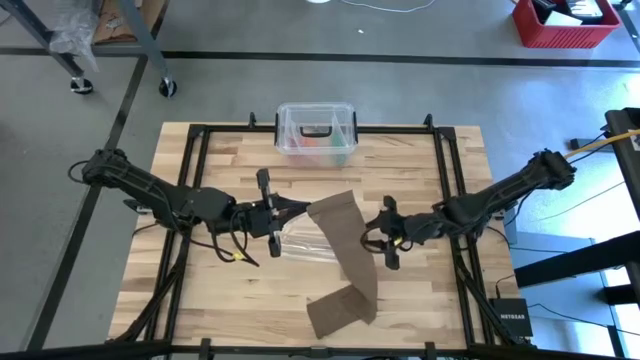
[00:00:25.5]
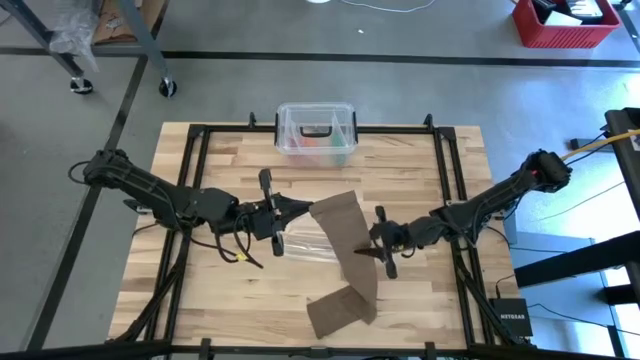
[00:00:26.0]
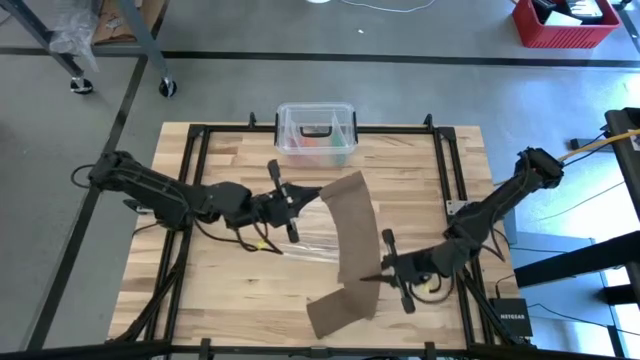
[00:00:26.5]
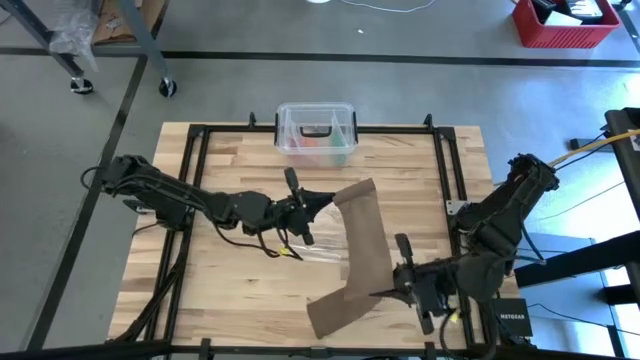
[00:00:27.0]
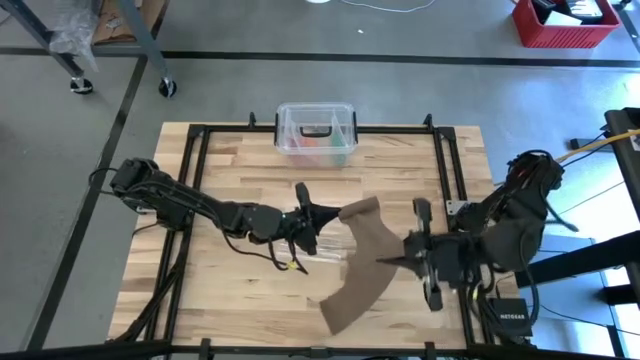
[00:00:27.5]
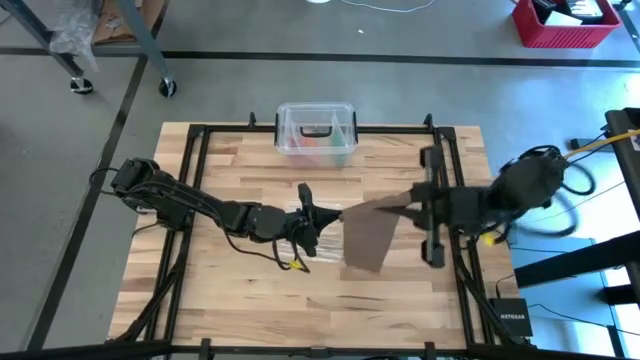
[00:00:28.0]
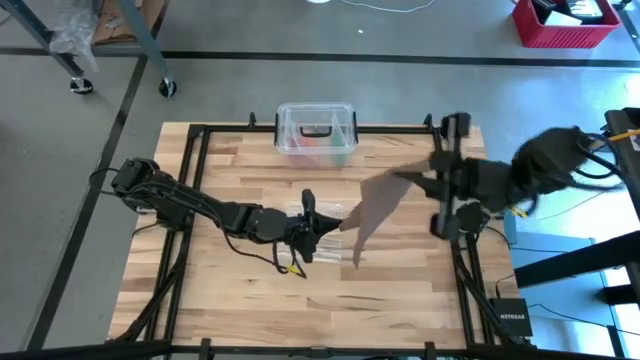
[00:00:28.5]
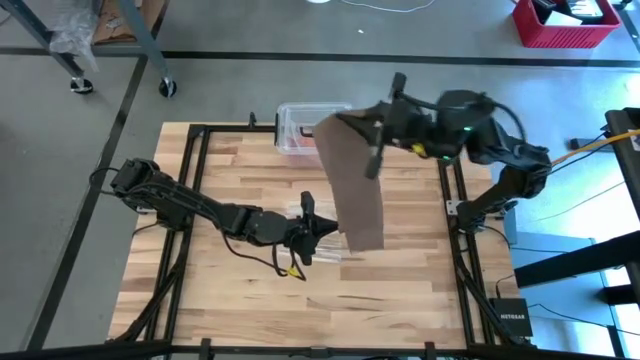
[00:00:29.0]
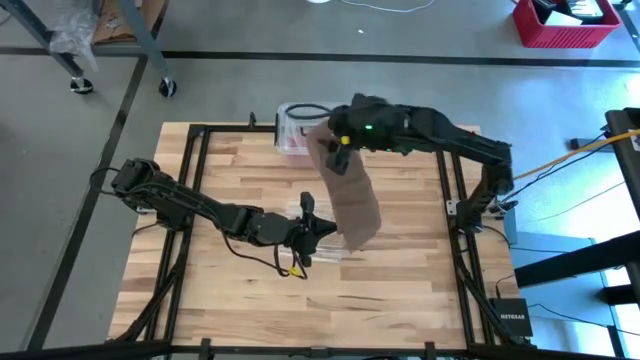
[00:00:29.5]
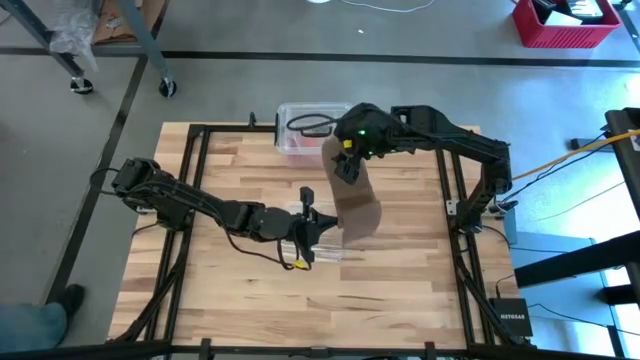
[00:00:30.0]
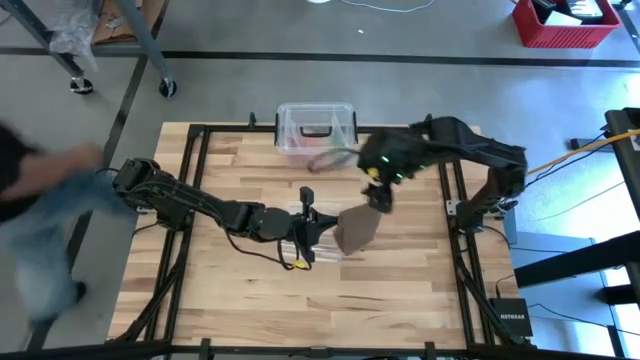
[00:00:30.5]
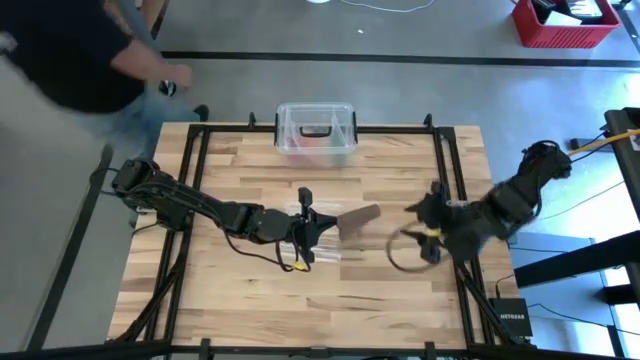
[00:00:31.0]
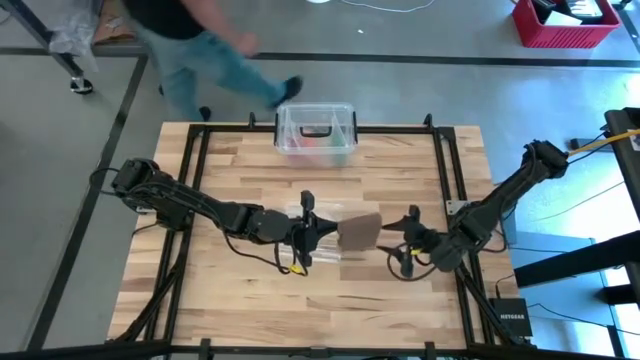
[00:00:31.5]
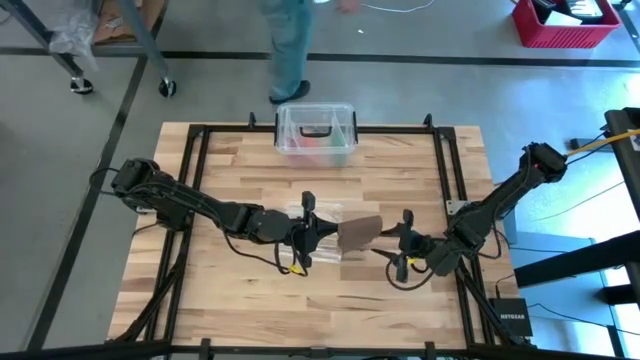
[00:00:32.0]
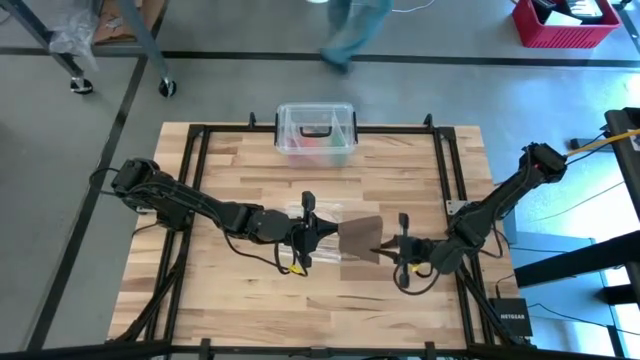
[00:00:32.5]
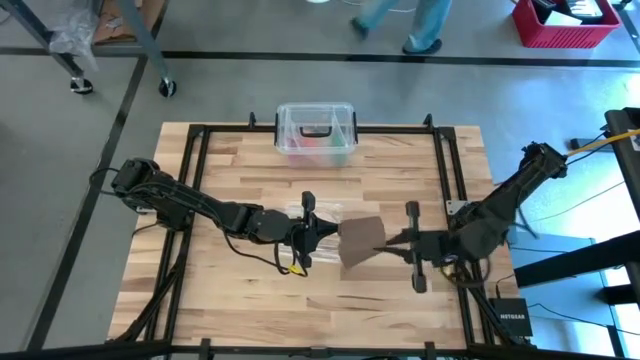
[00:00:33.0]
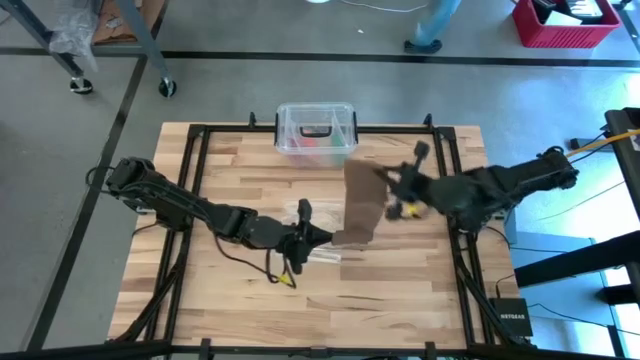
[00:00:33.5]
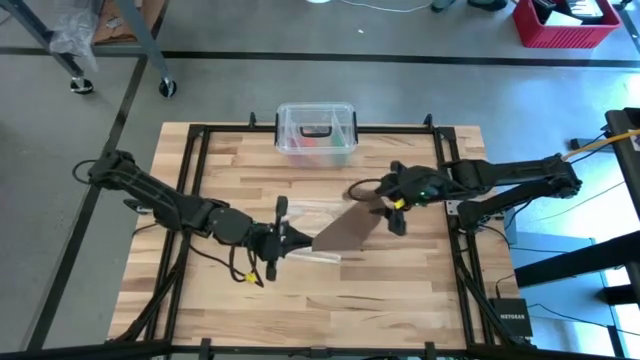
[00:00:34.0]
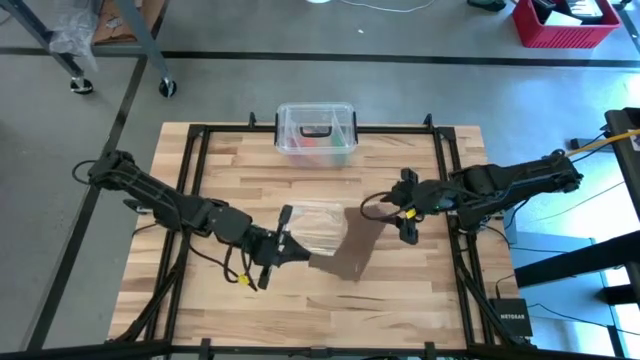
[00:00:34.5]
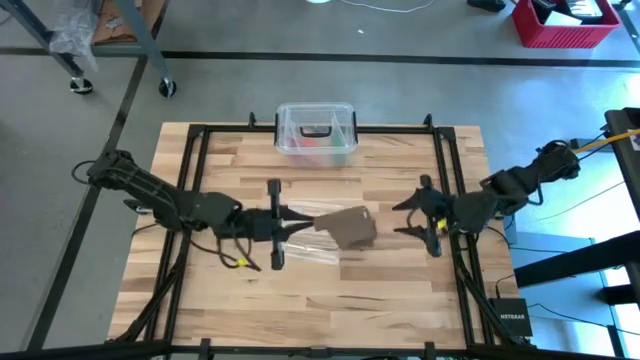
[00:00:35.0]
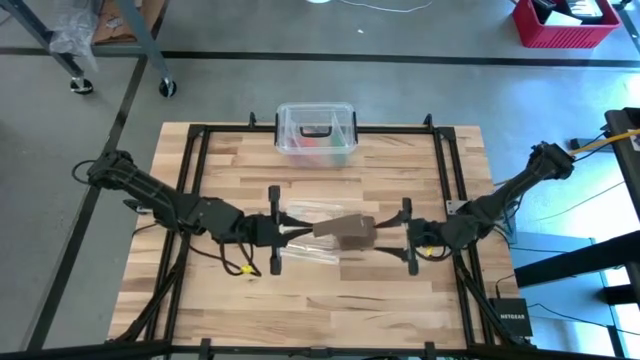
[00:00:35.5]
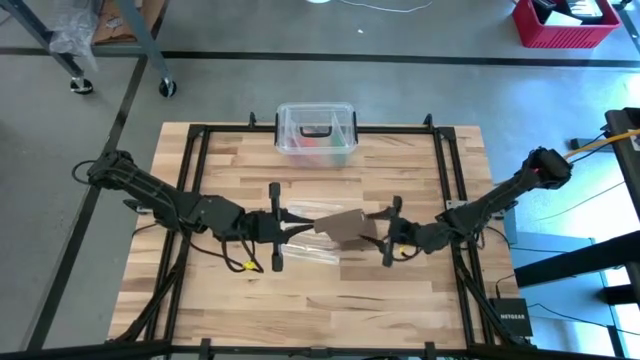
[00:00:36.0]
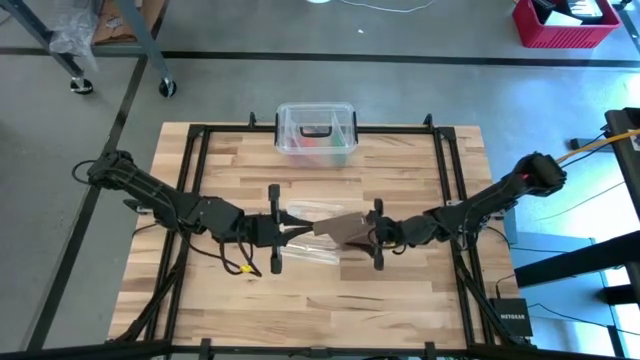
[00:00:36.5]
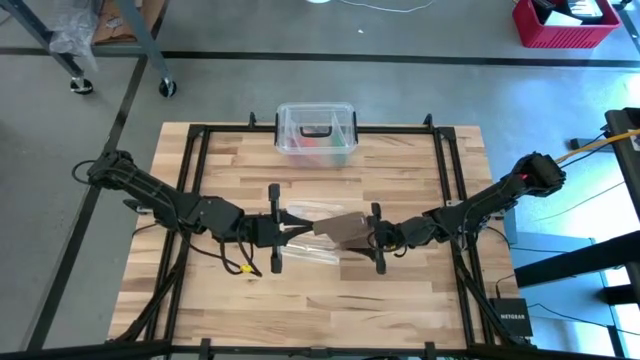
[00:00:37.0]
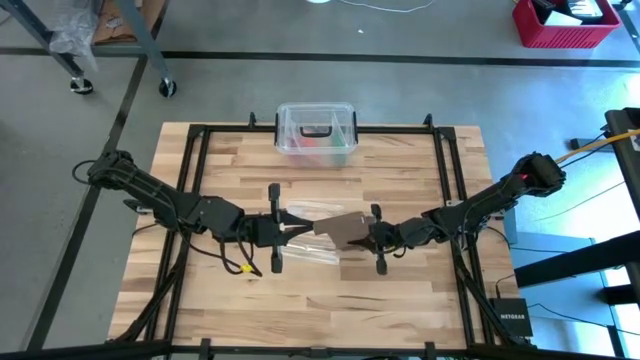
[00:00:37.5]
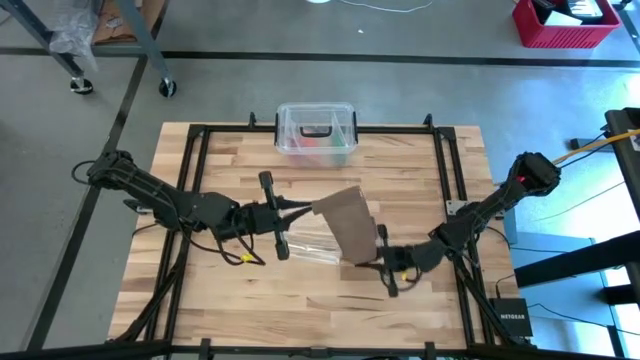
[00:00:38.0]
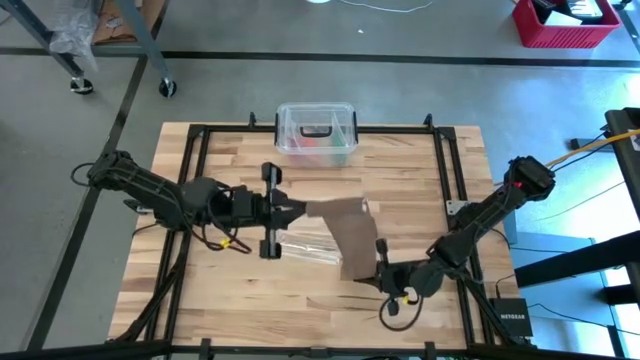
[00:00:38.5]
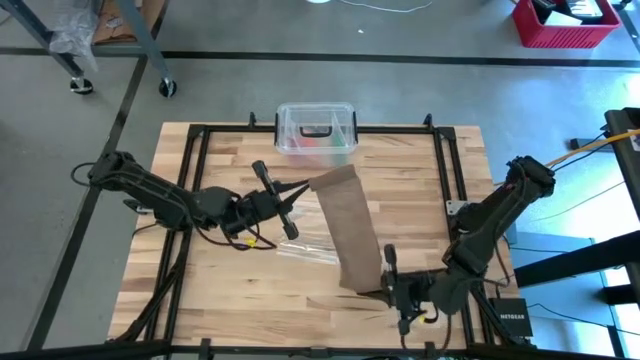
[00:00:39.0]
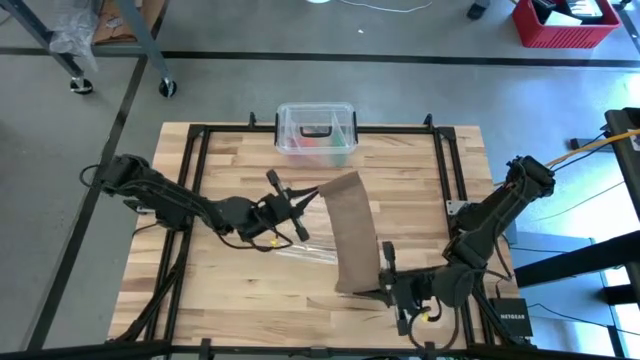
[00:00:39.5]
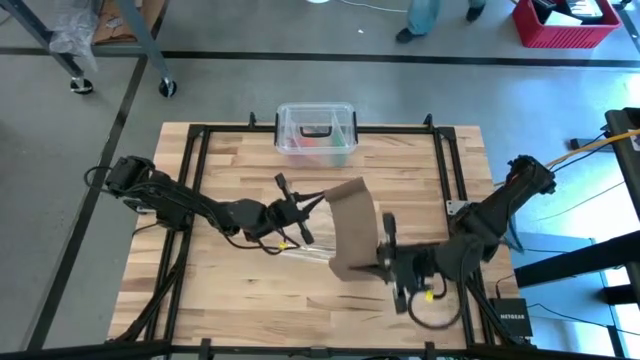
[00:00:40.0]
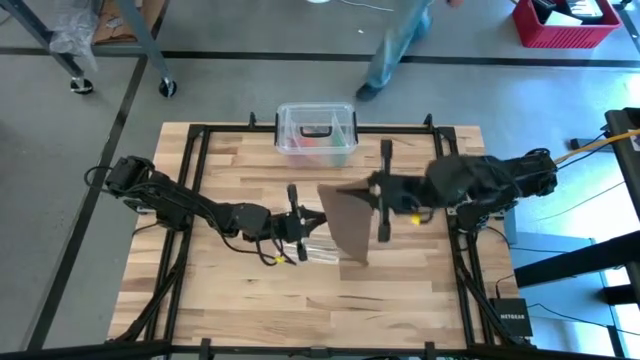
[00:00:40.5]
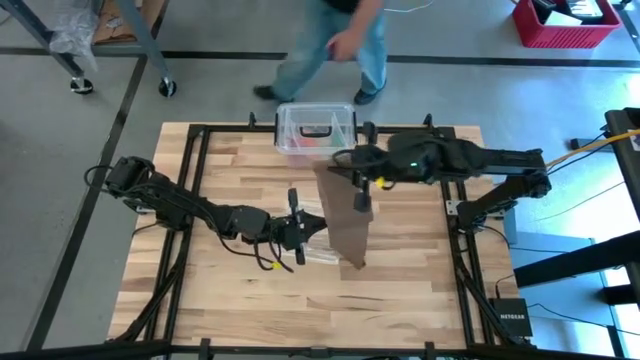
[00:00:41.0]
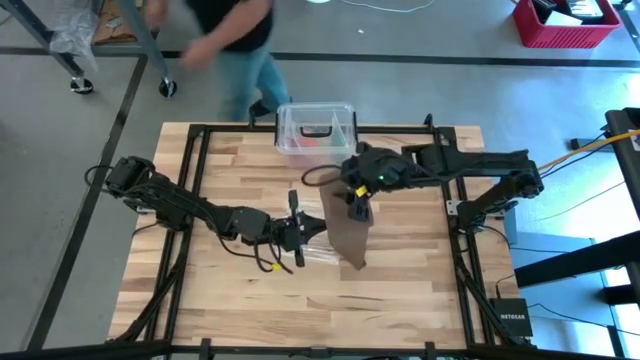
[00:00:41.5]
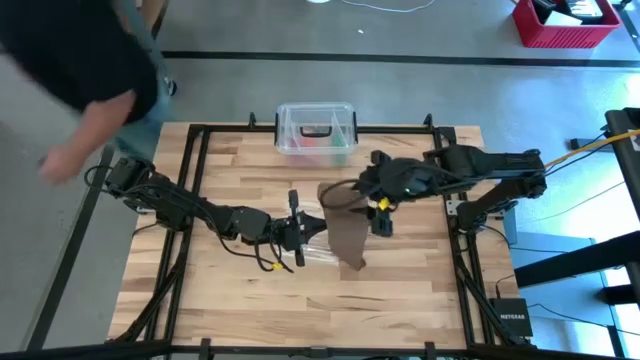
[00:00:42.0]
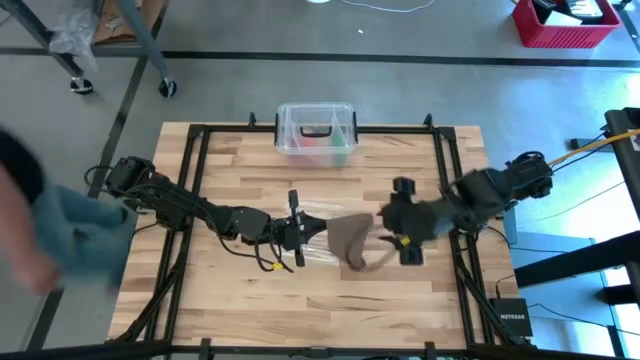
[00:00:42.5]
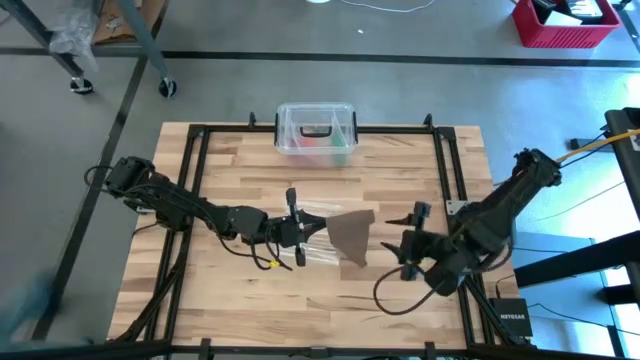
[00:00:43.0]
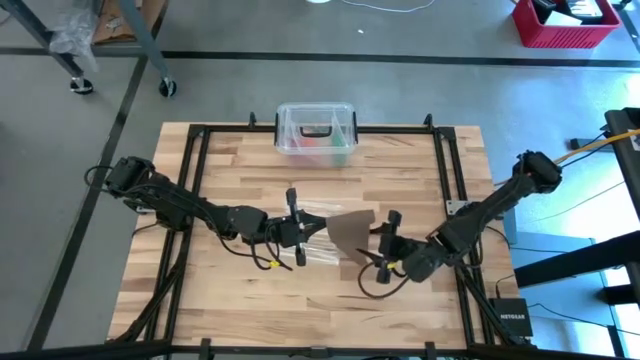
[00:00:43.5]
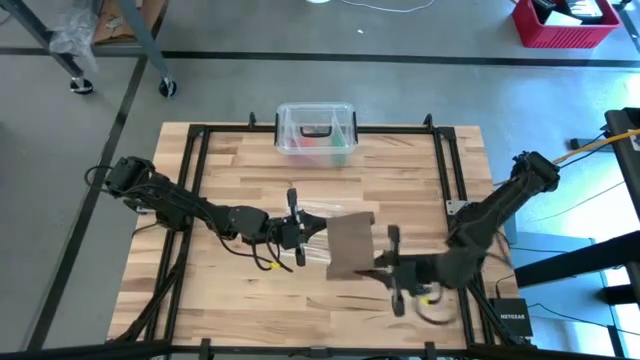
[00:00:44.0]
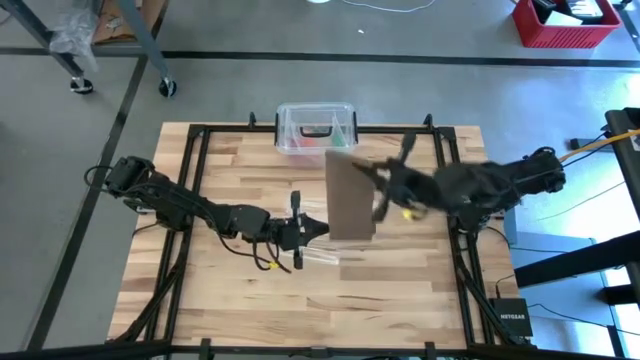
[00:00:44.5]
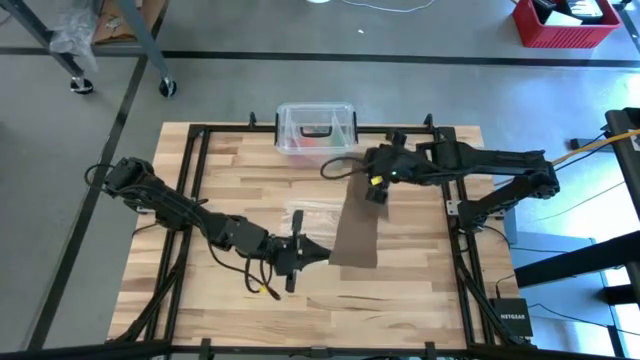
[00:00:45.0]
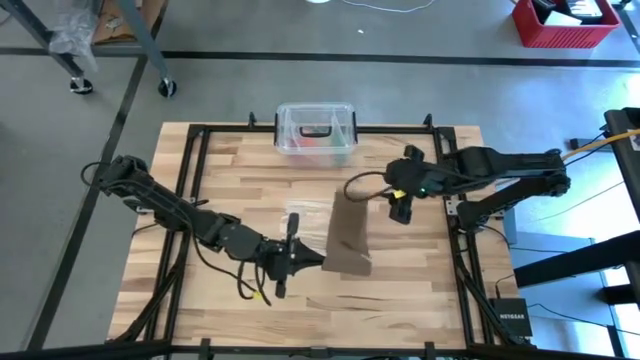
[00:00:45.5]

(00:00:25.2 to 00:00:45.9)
Task: Roll bandage
Roll the brown bandage
